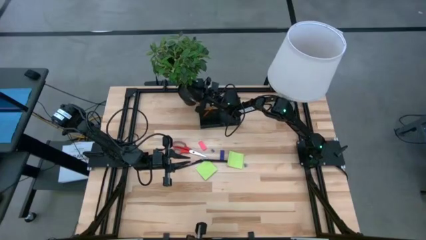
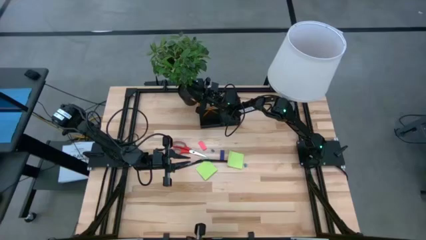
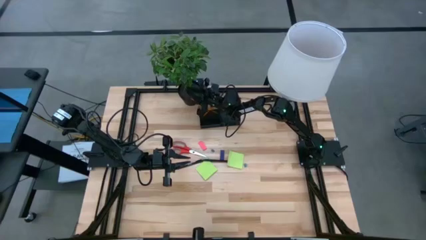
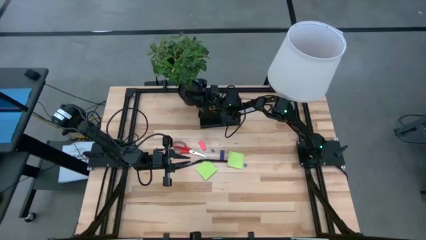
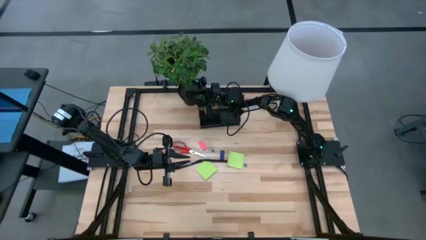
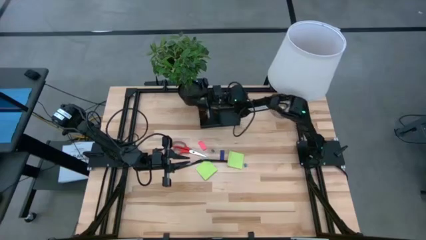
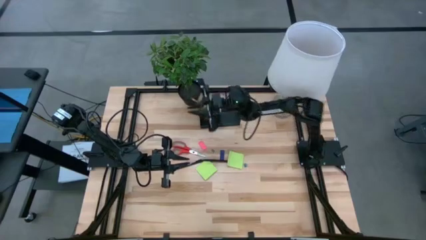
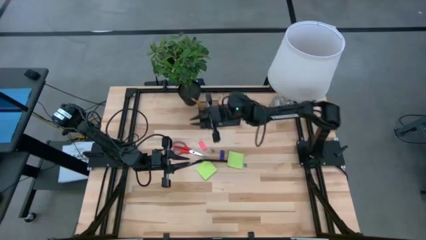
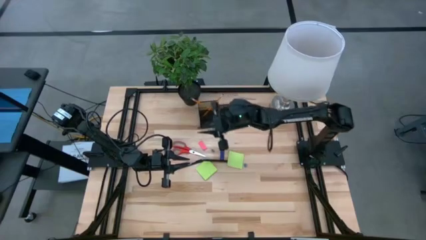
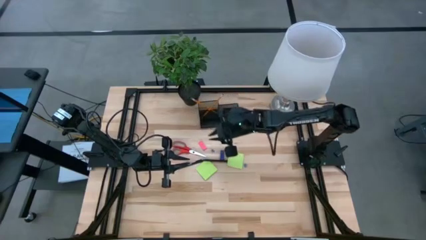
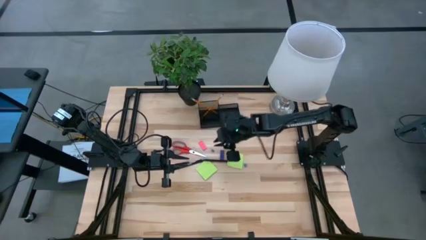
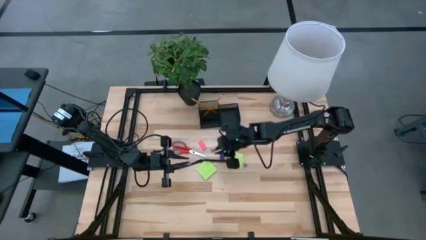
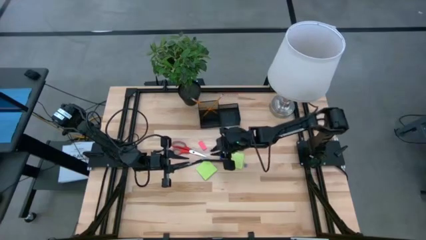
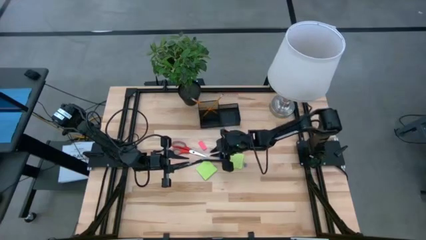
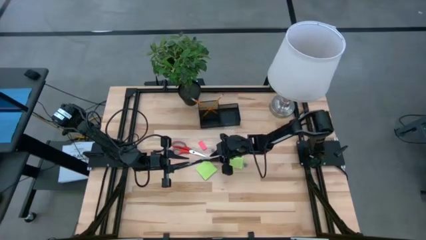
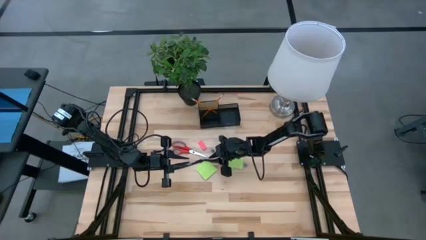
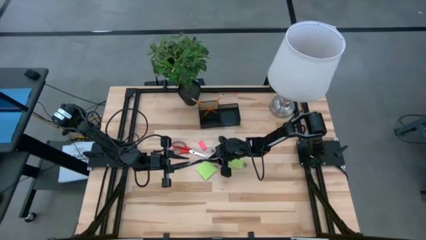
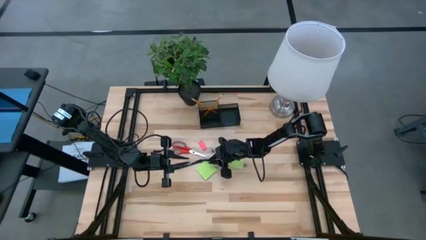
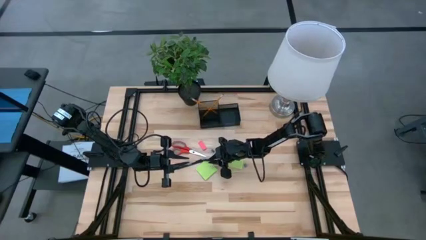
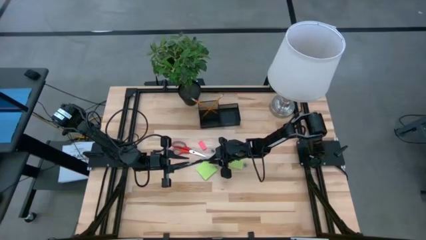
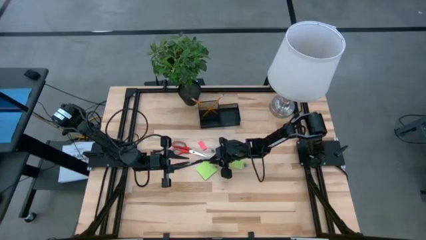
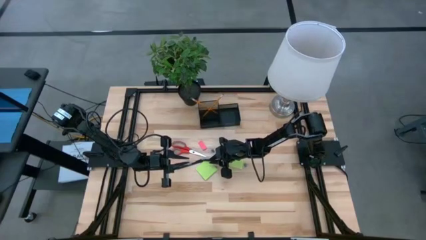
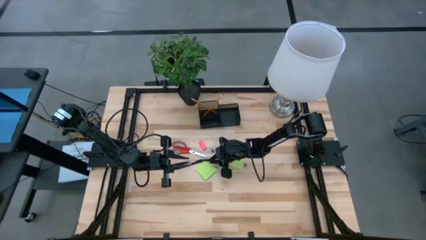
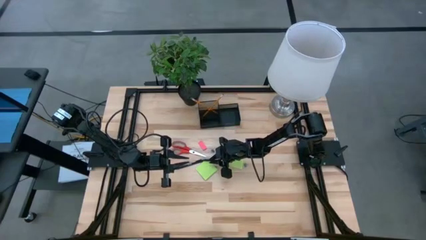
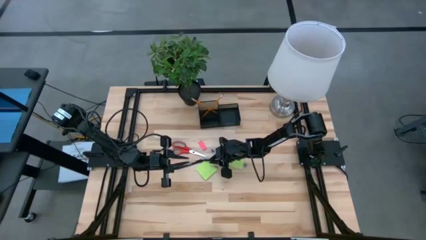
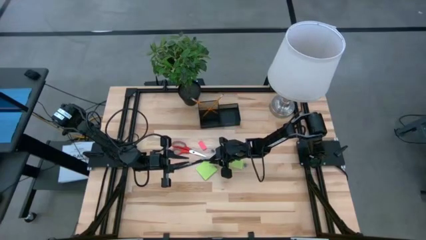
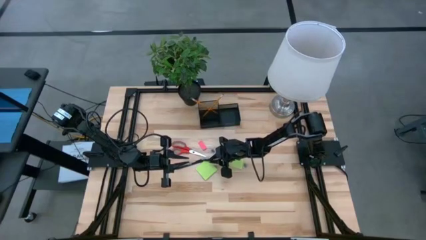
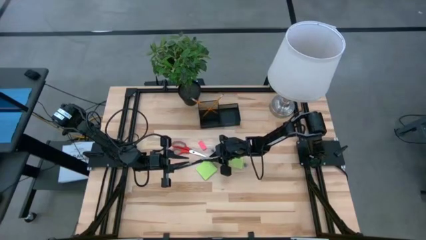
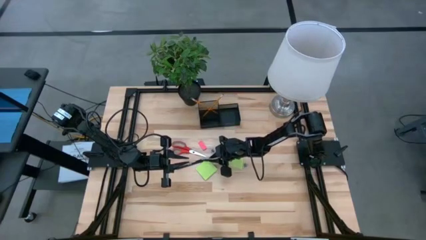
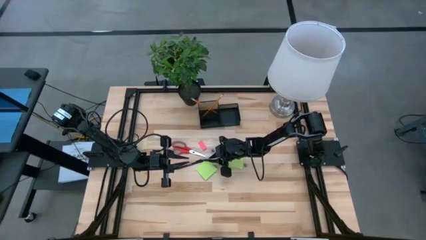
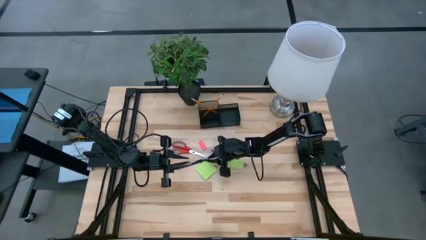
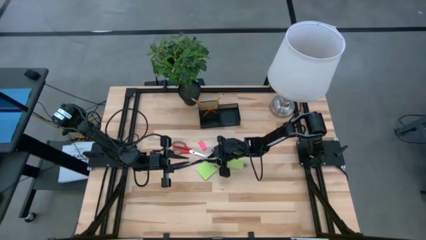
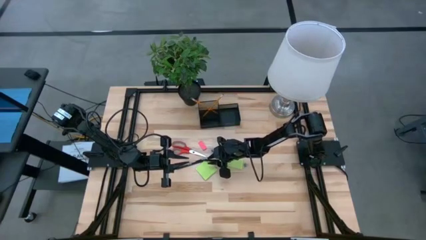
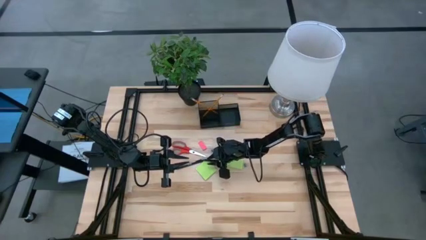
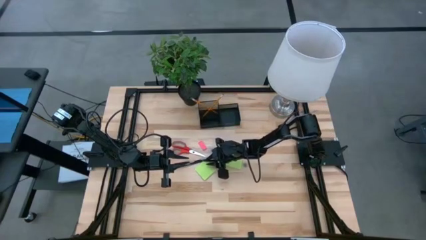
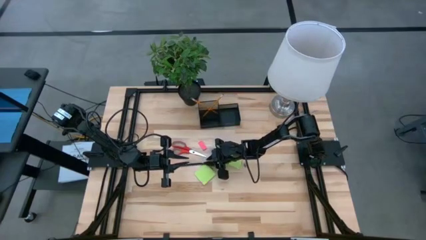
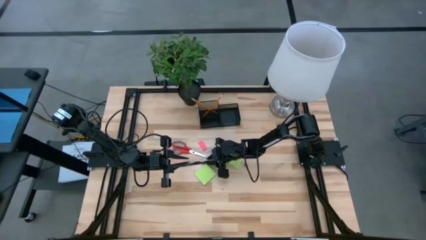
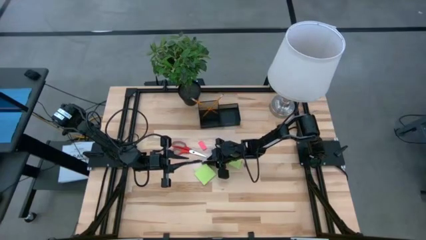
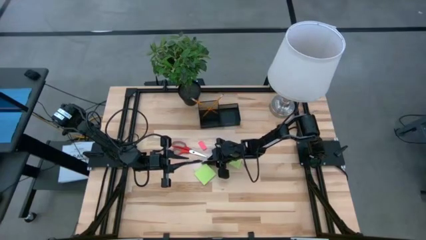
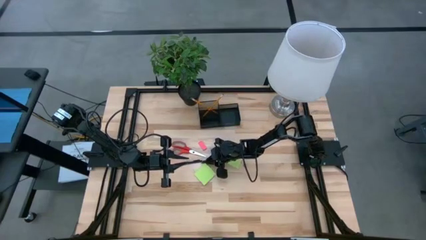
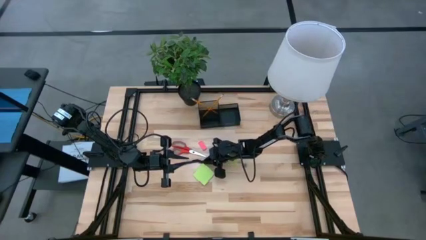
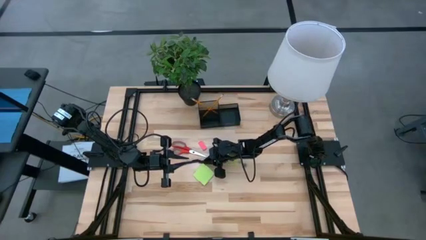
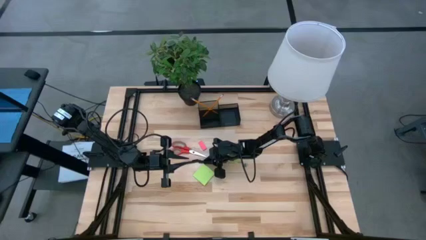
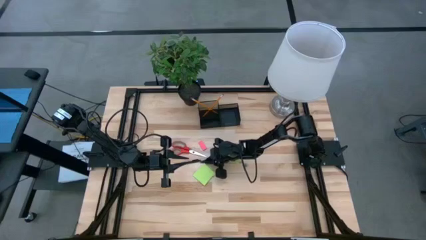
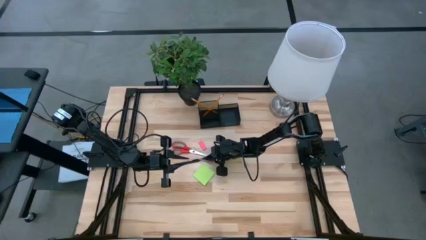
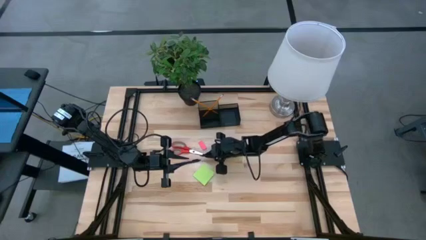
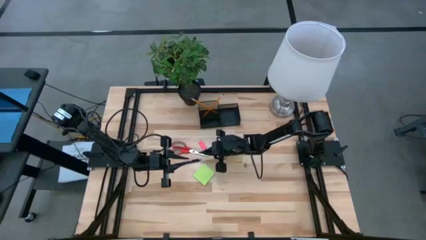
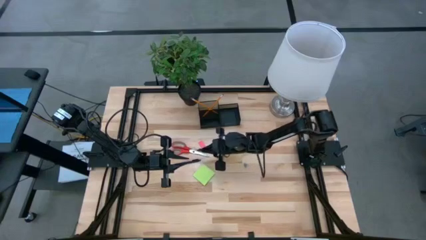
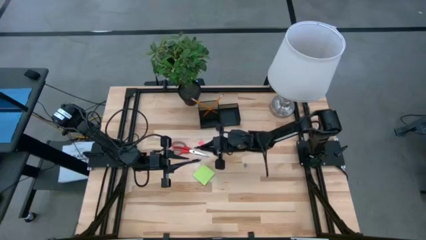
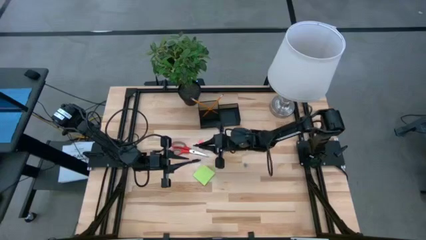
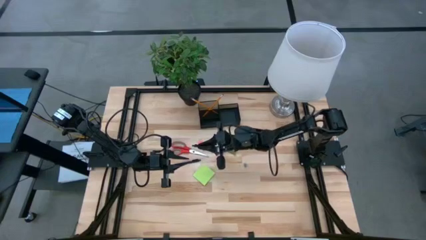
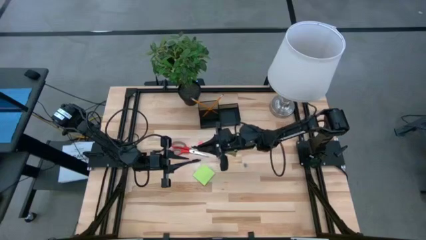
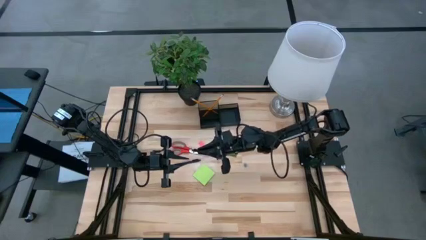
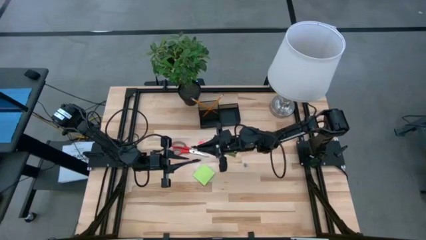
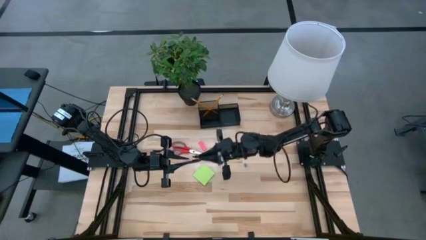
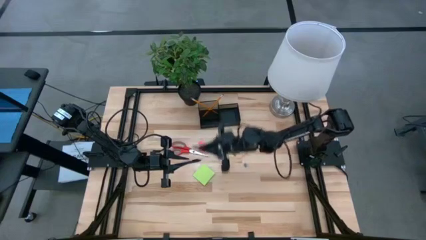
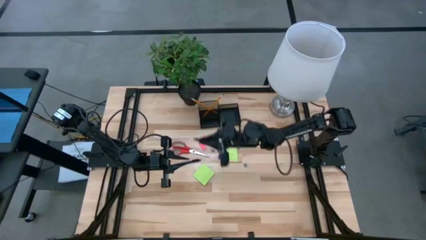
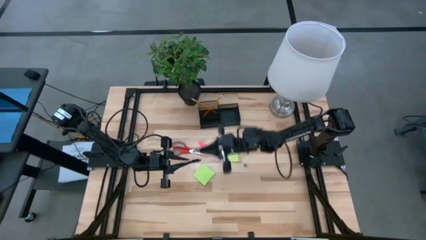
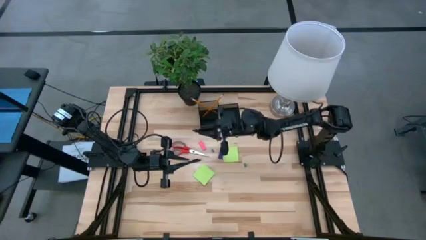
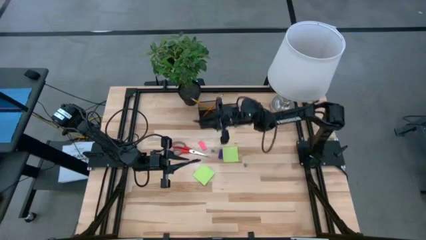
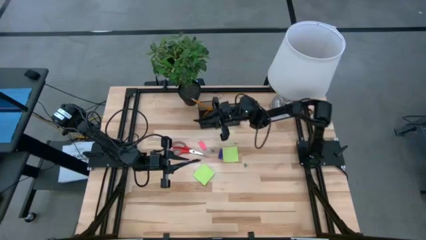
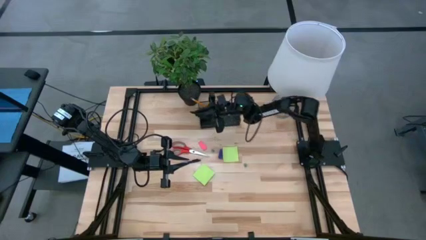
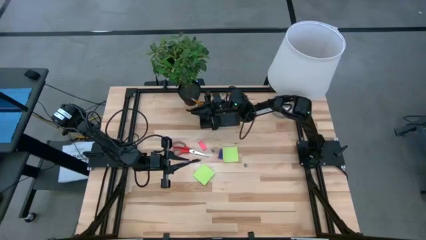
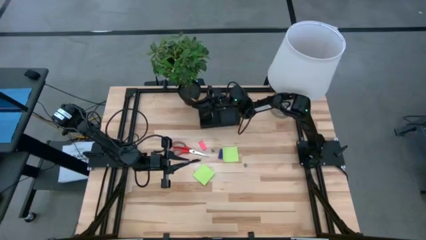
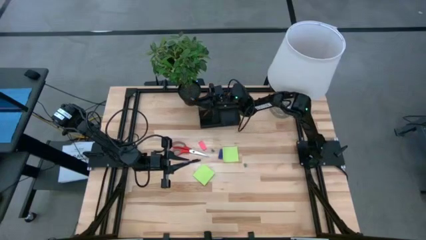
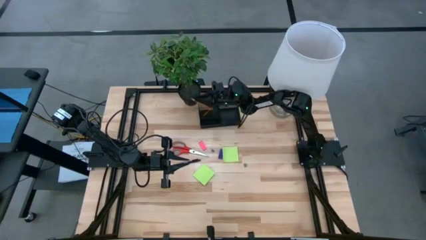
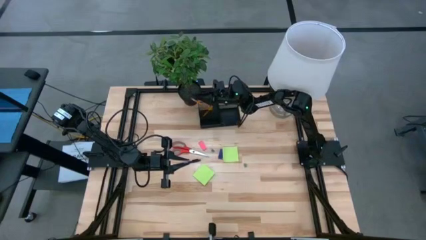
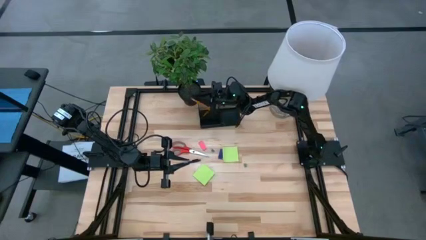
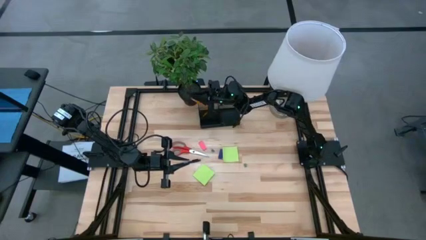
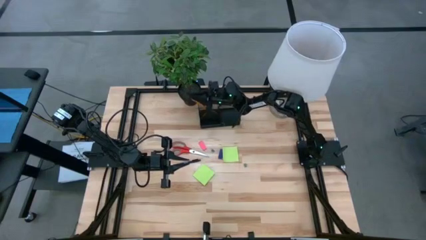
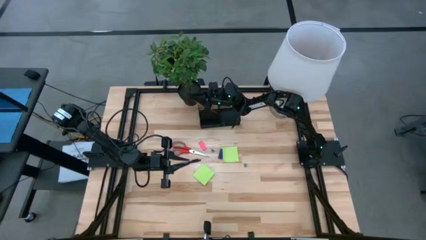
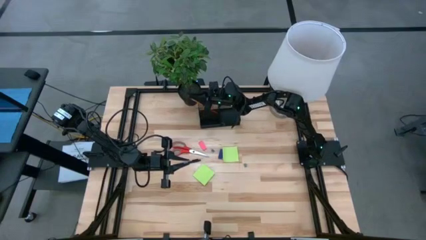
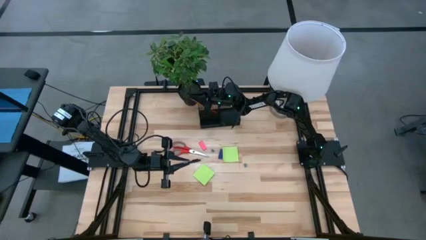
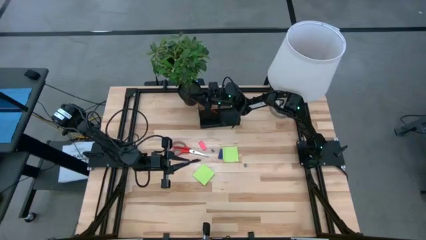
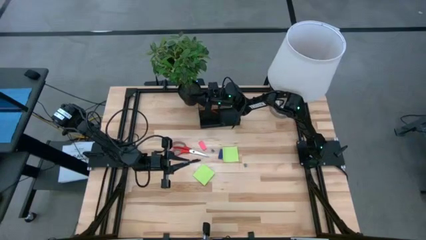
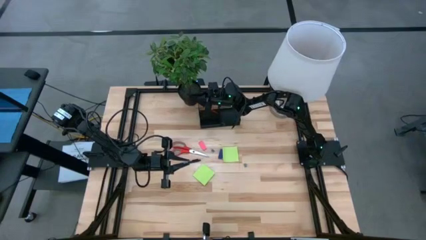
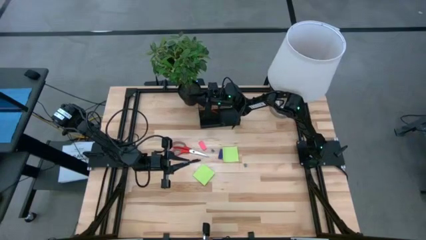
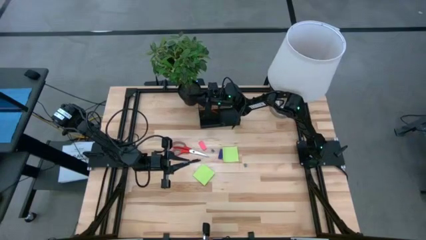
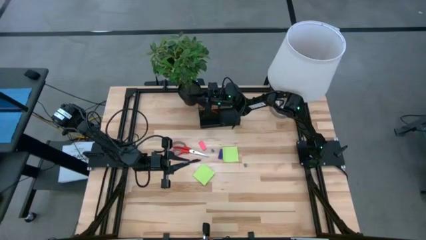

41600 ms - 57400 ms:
Task: Pick and place office supplies into organizer
Put the right black ballpen into the desk organizer
